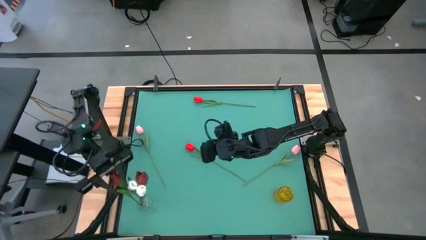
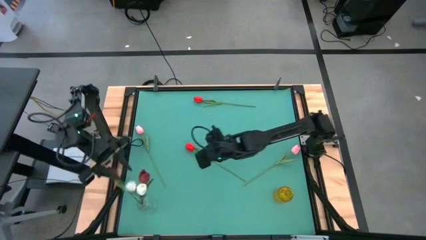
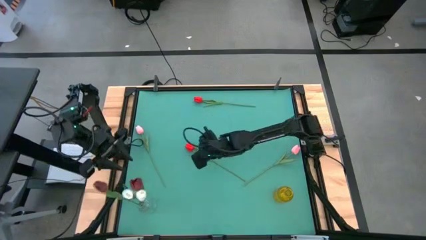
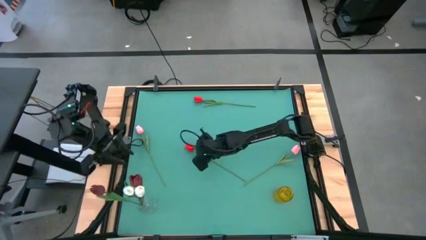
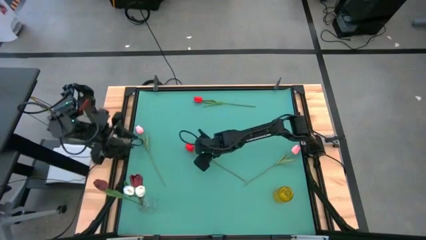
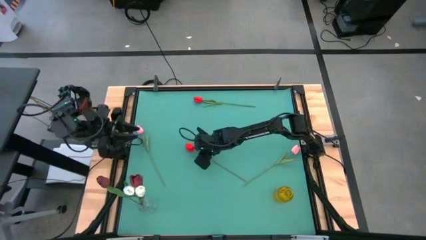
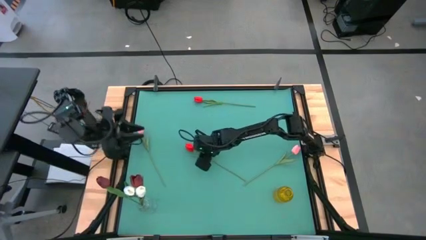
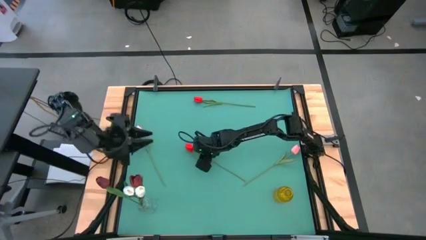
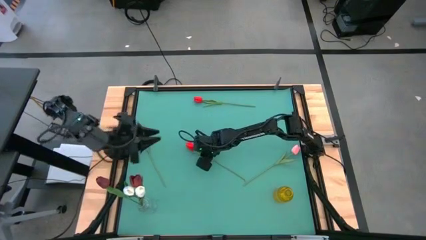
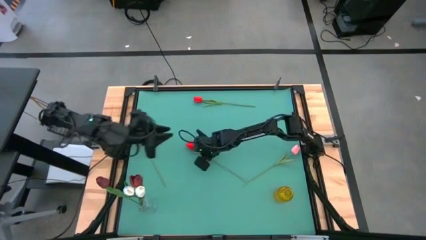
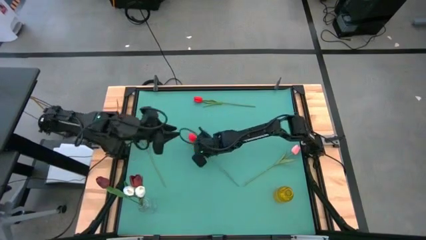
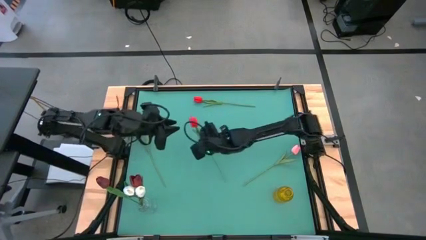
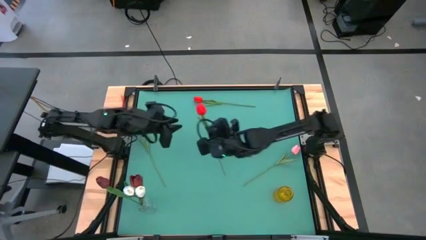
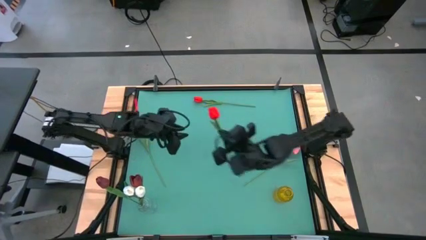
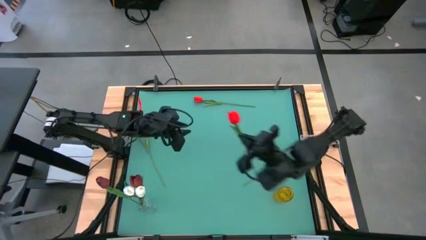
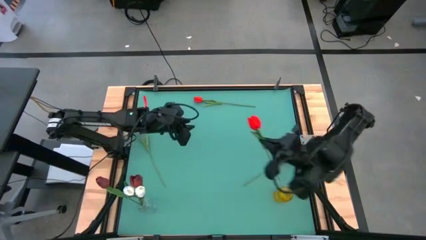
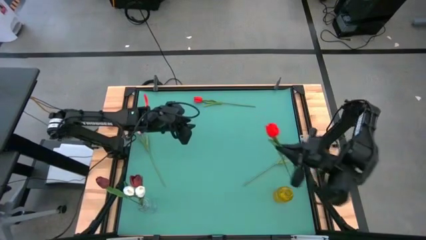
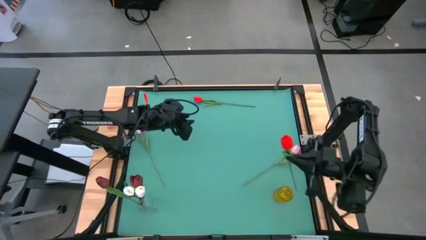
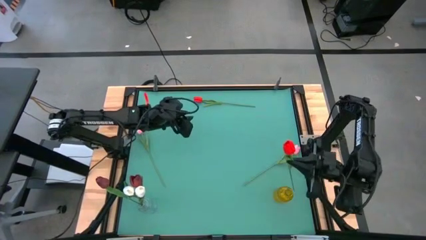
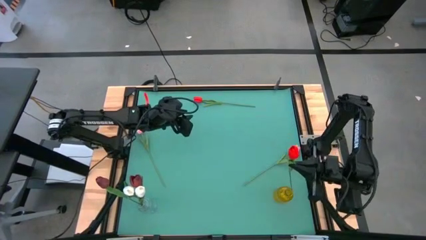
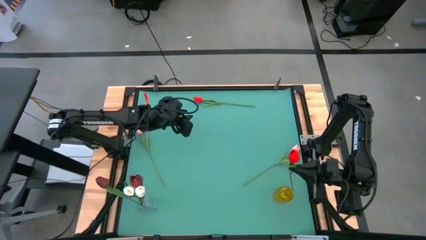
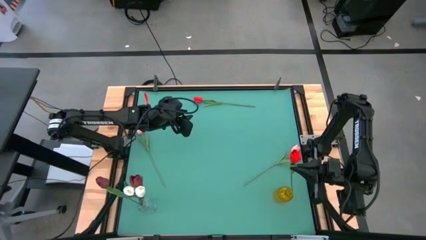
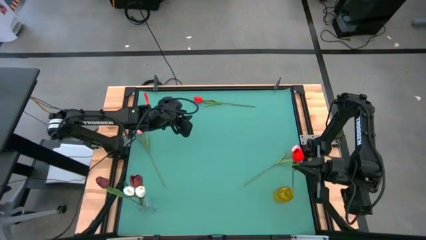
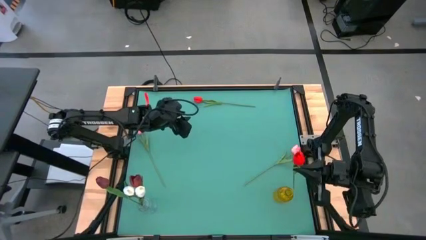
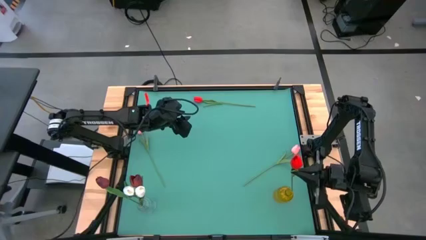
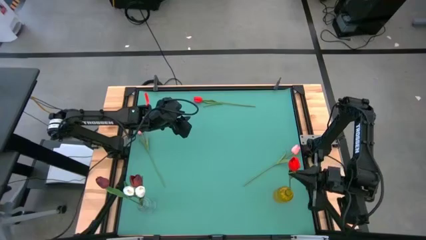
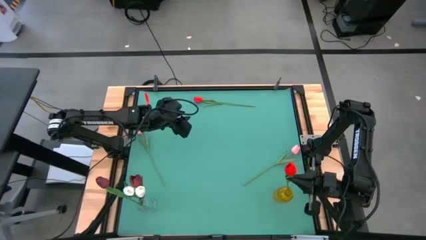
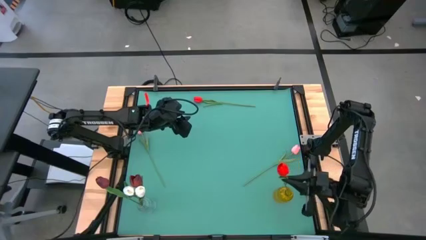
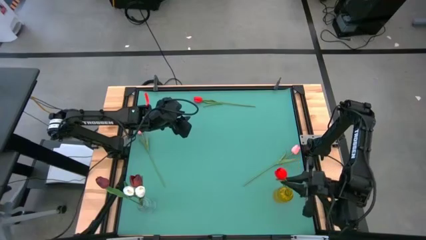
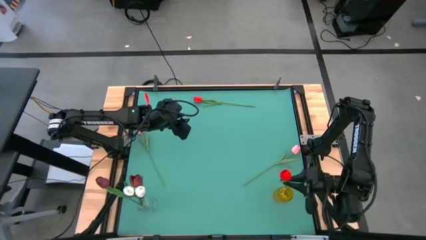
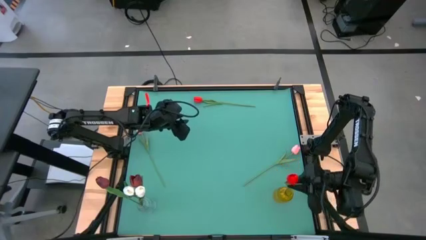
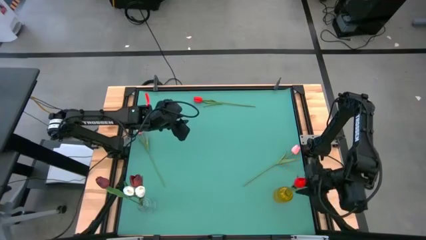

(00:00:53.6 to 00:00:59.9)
Task: Sort flowers into vase by color
Put the bottom red flower into the yellow vase

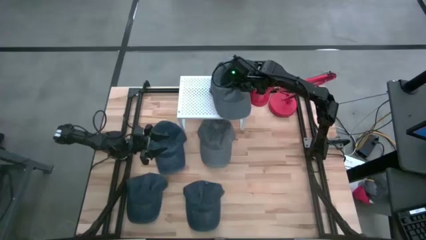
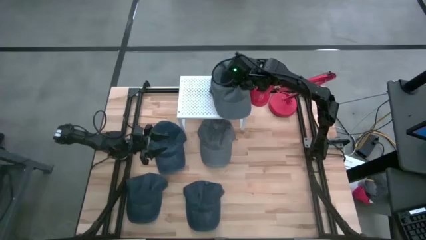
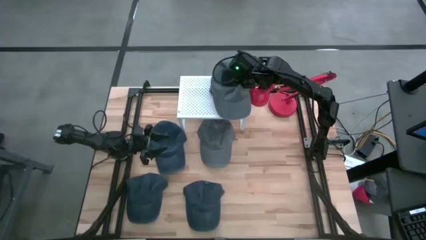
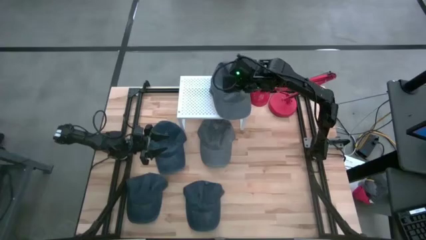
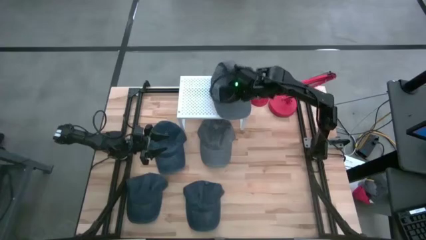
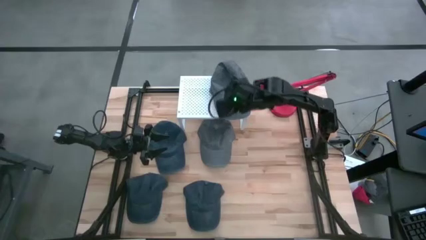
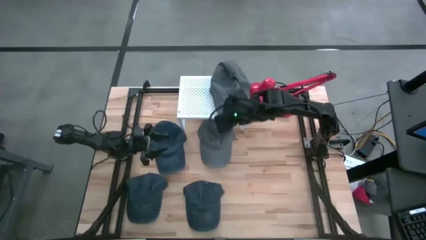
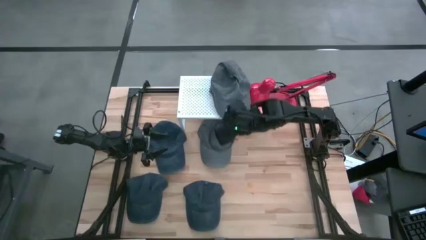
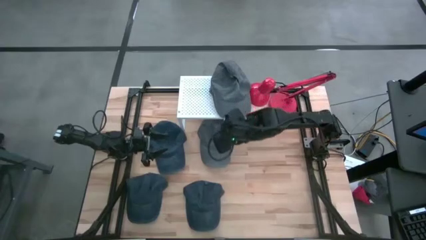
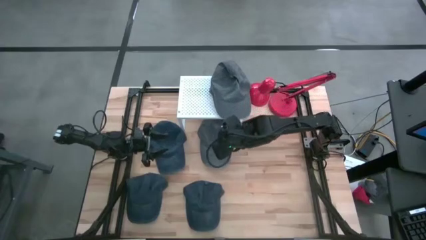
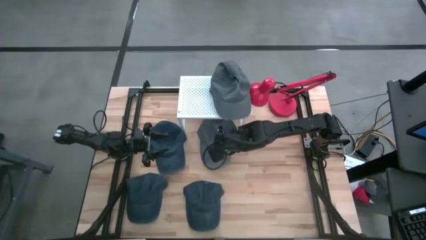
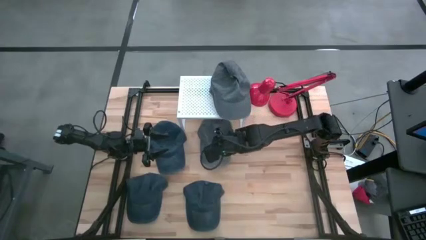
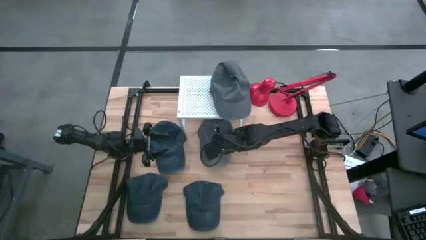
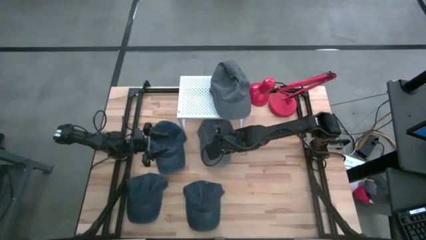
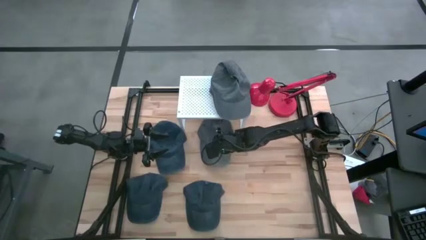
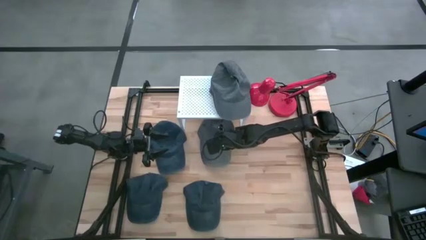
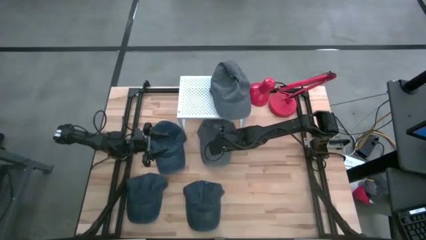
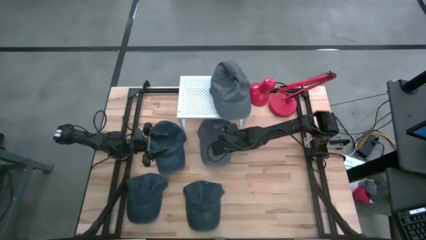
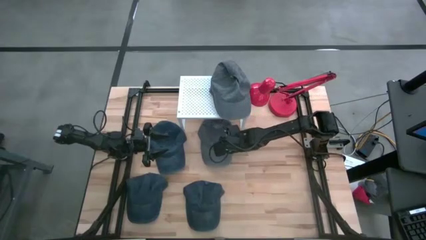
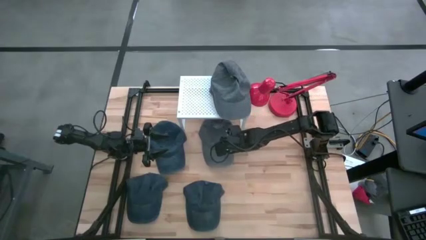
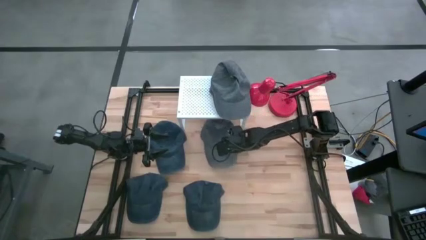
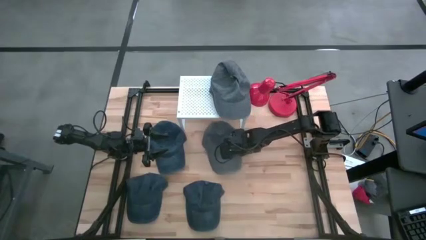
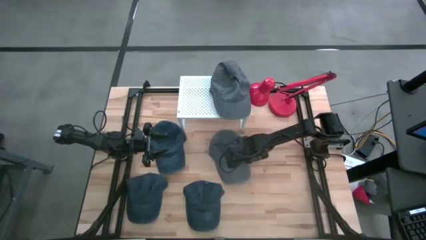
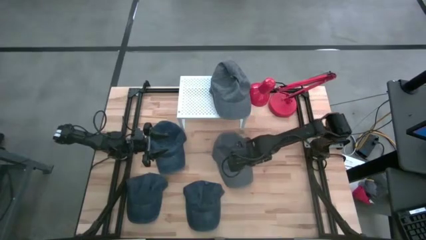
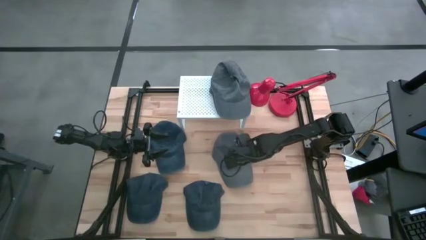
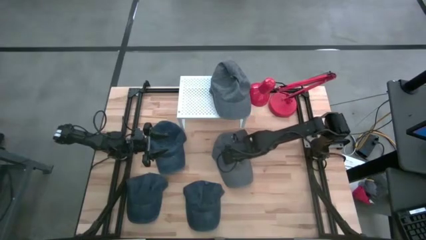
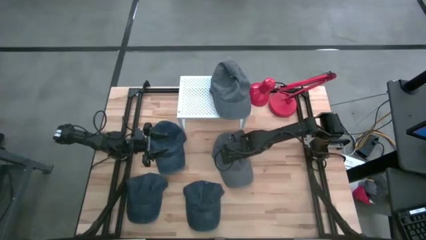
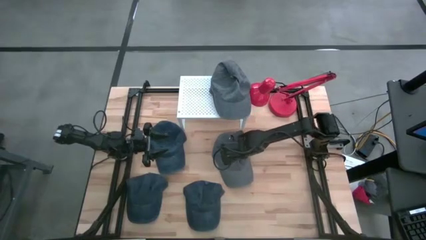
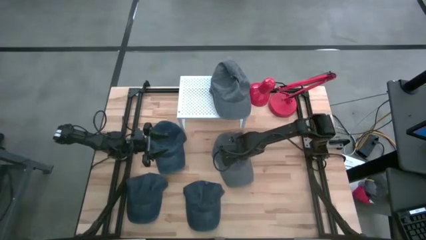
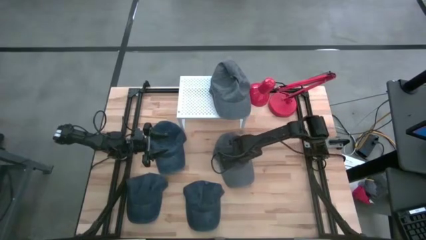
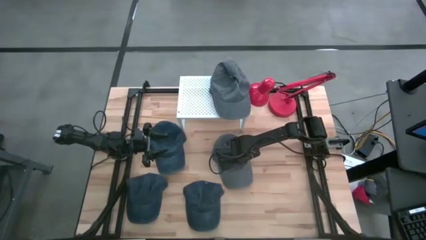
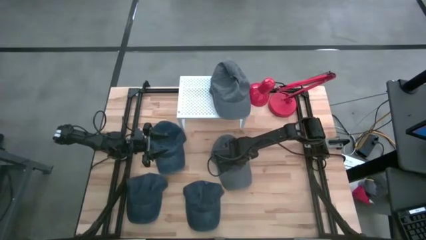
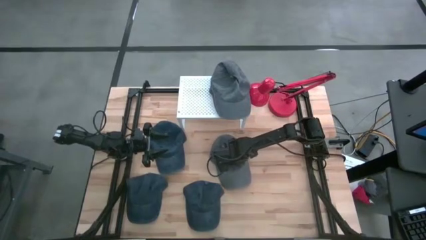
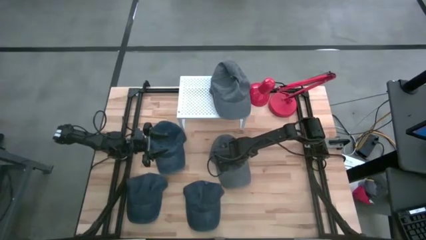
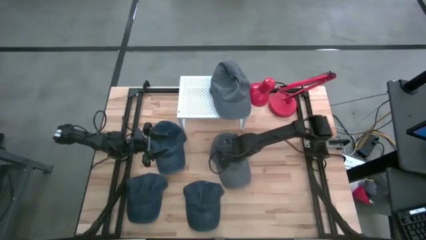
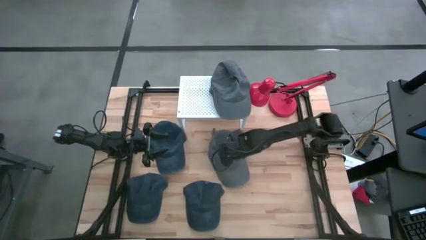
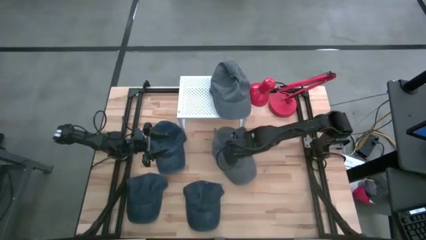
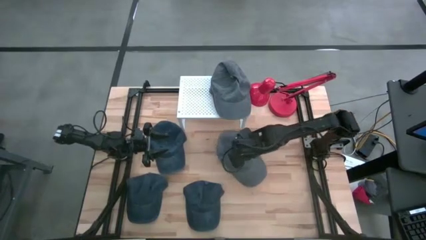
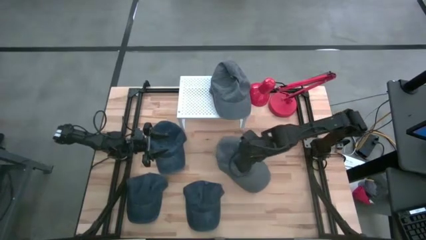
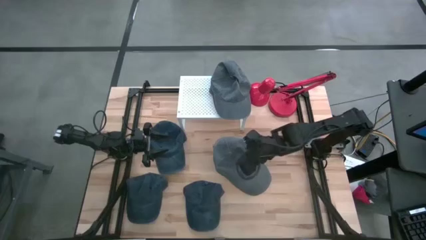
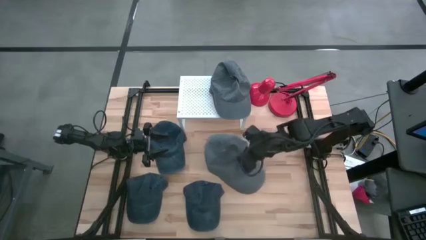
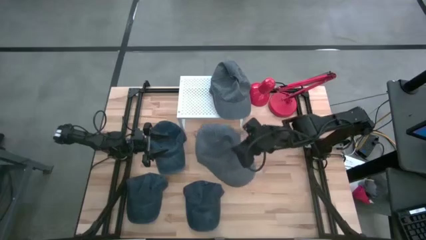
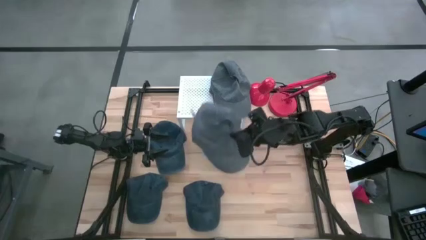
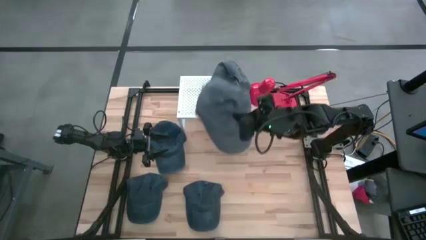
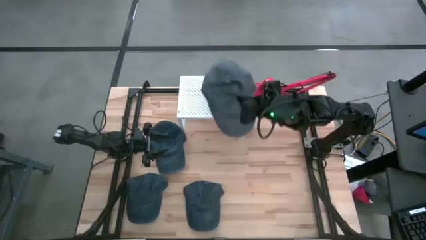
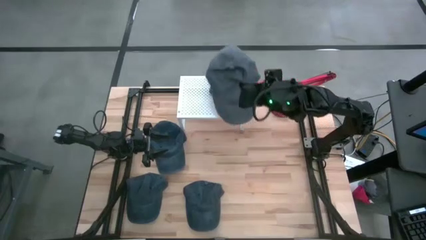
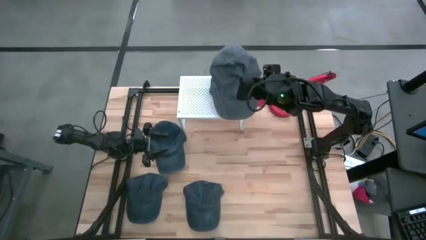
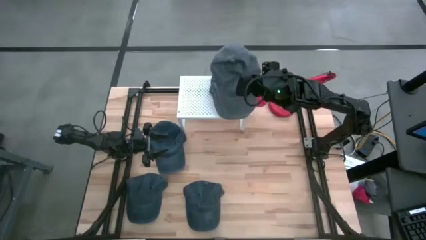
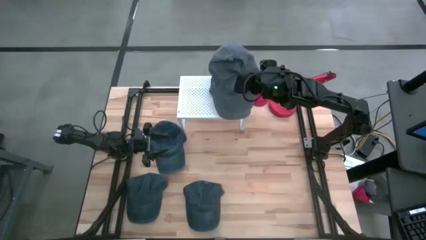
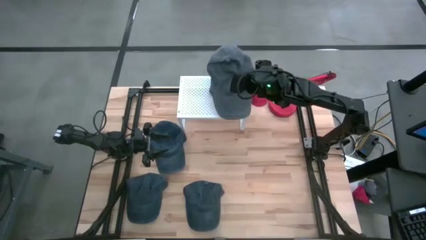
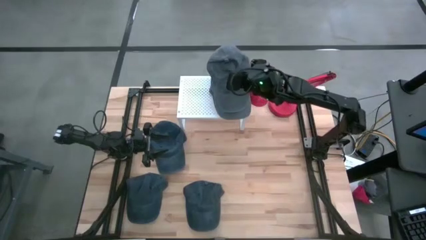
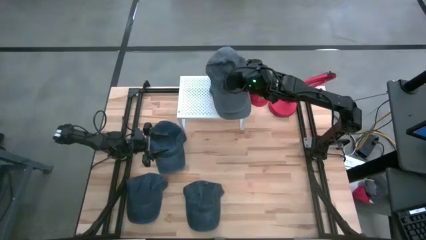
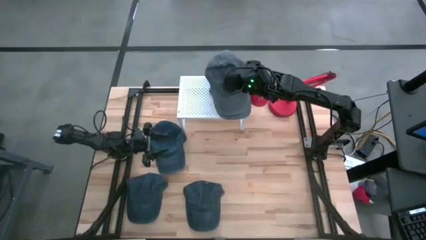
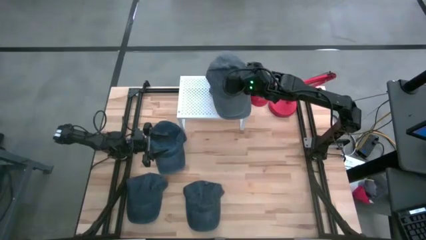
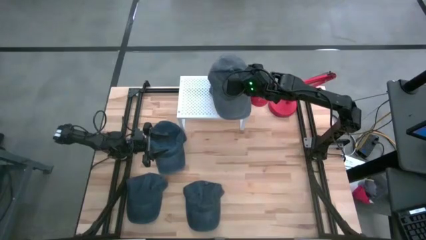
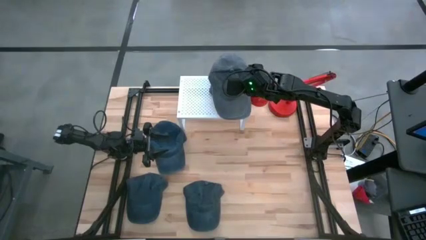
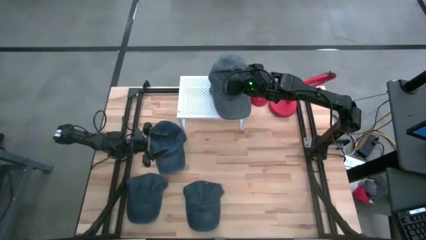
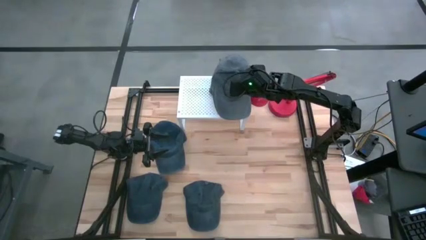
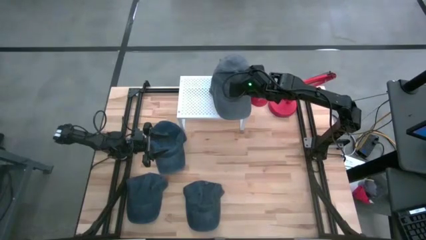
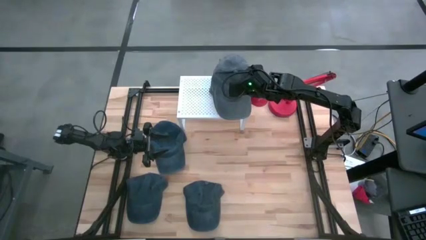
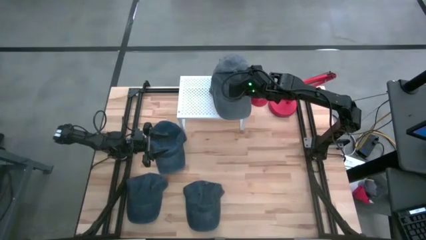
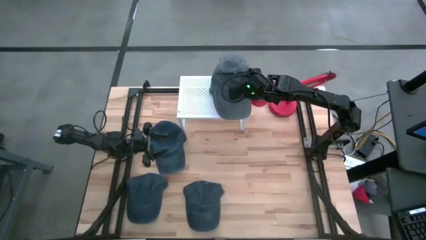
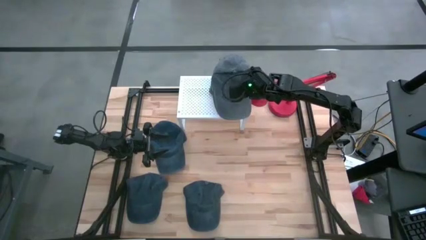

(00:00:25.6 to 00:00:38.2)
Task: Pick & Place hat
Stack the gray cap on the gray cap on the shelf
